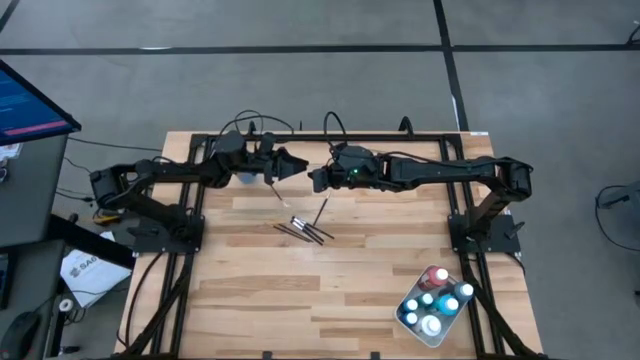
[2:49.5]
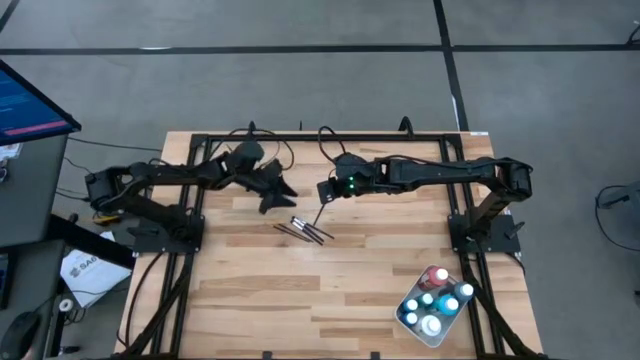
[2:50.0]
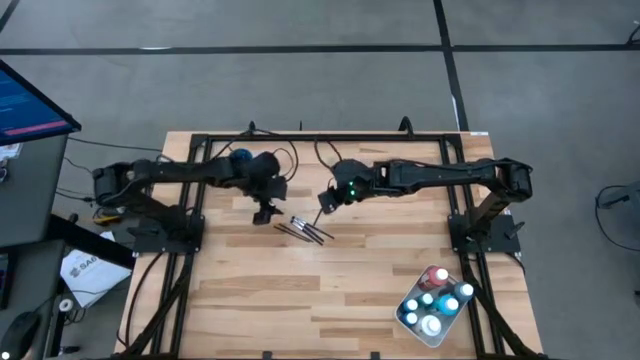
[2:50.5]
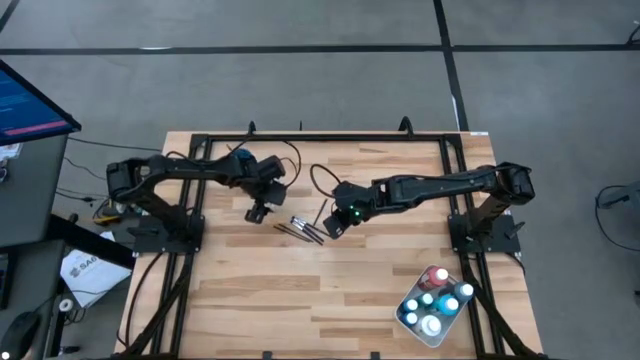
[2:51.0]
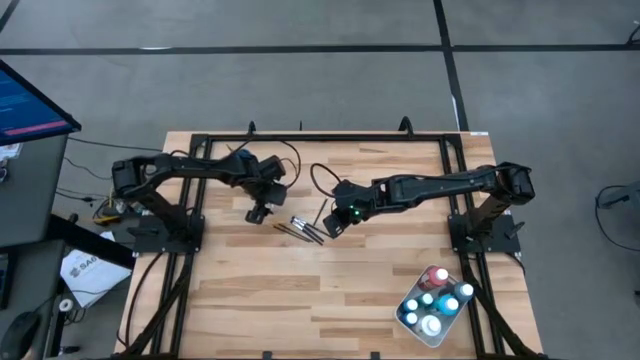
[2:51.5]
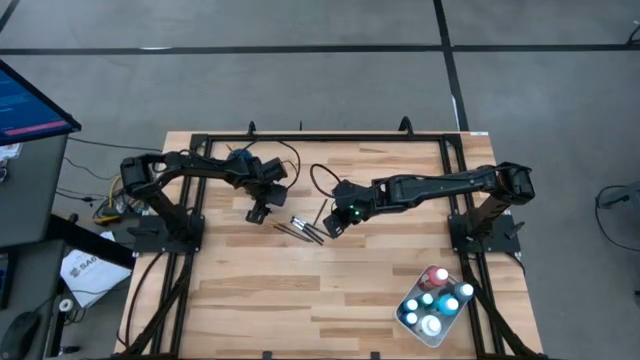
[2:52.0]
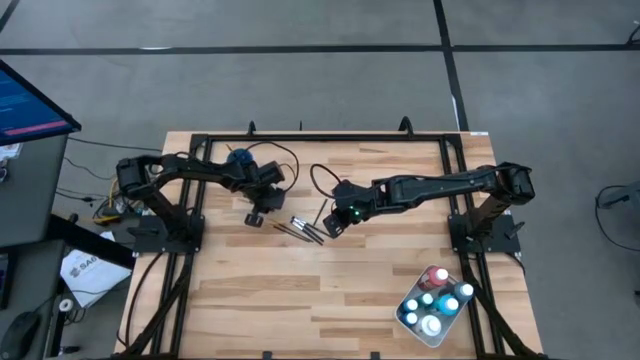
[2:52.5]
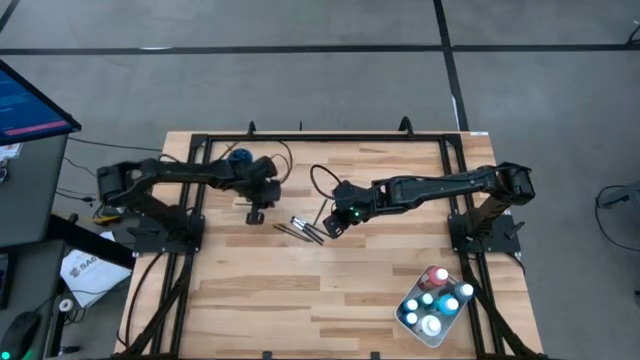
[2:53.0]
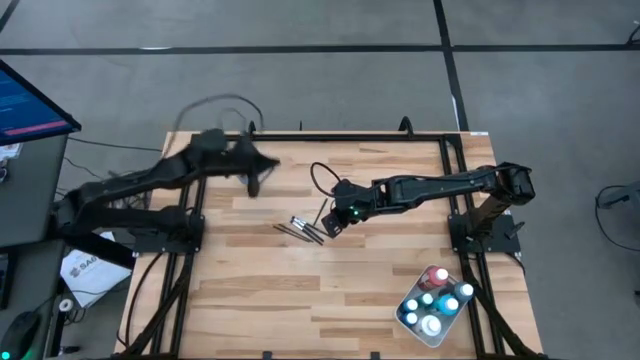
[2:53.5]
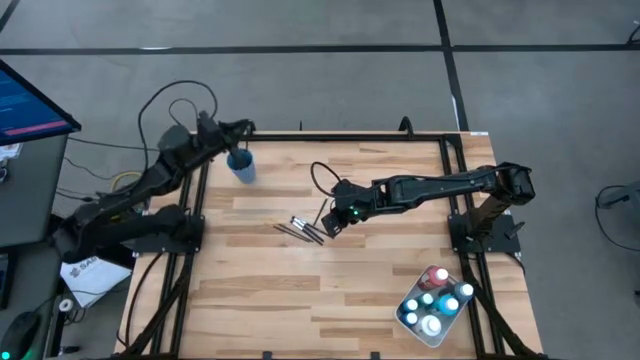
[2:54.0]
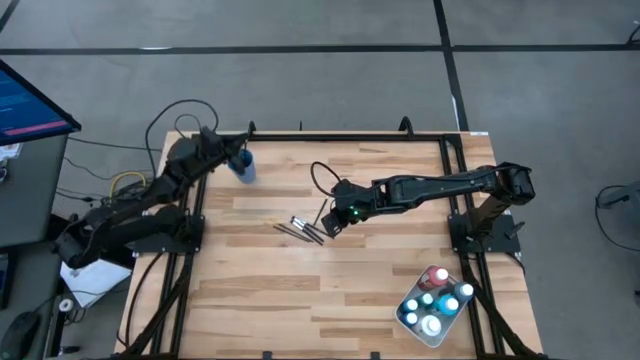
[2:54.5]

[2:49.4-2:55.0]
Task: Pick & Place Paint Supplies
Put the silver paint brush into the blue cup

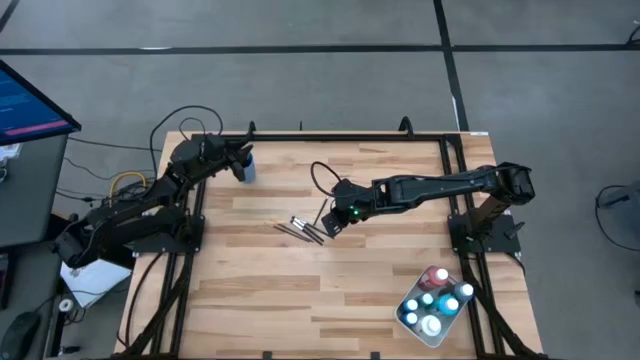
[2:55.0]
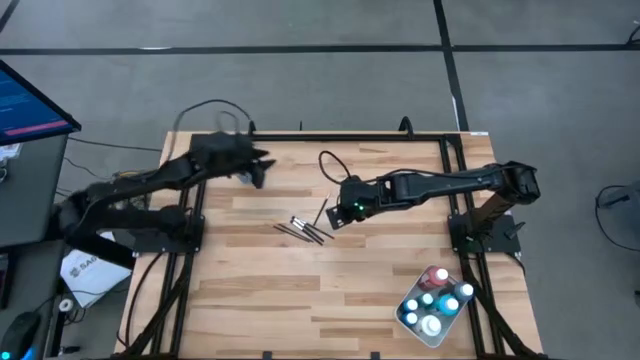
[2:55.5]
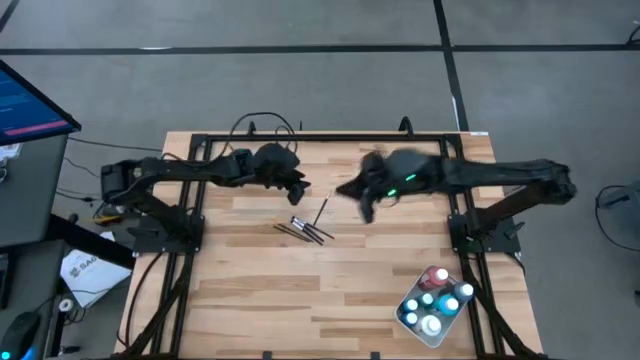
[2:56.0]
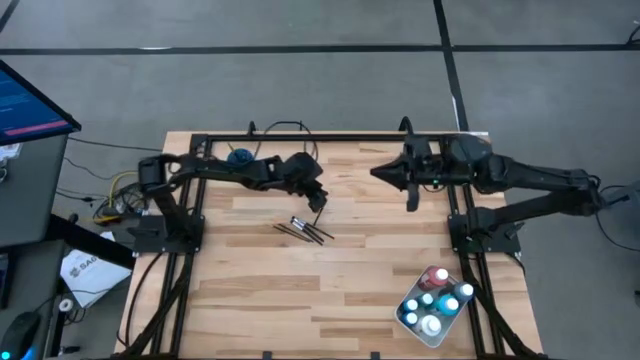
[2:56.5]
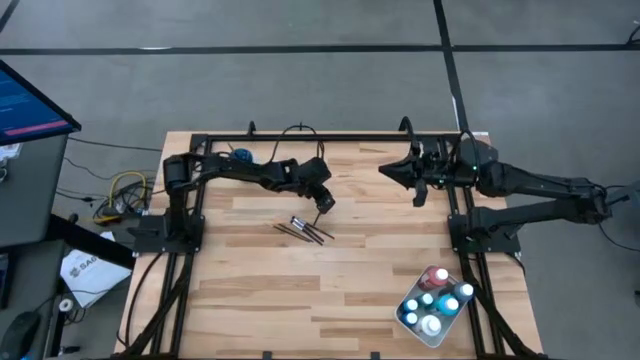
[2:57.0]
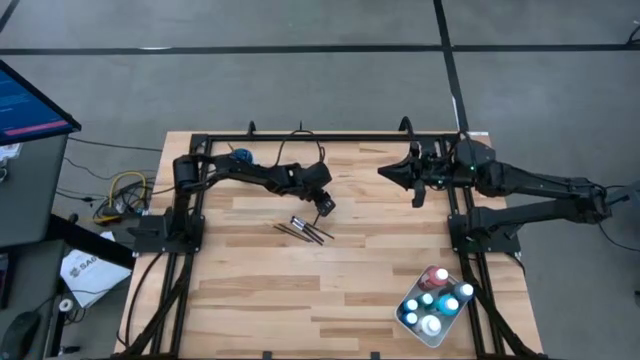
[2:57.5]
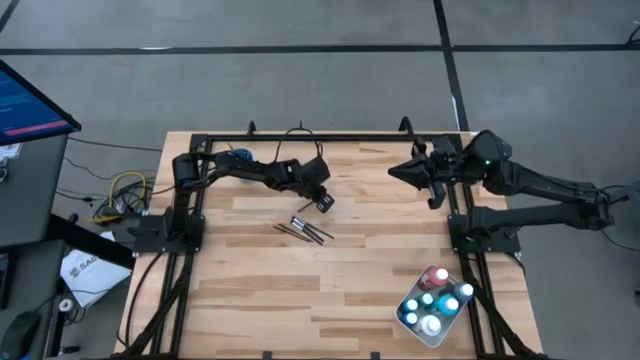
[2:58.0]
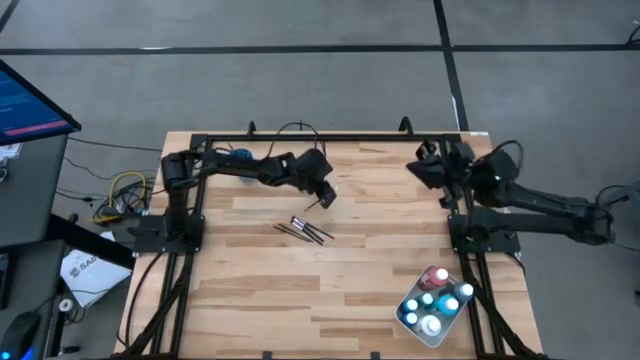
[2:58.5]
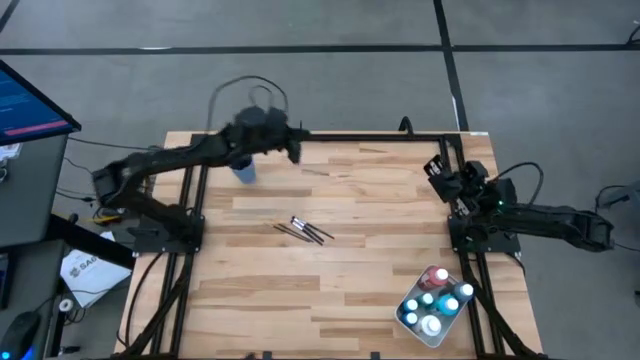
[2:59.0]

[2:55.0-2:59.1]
Put the silver paint brush into the blue cup

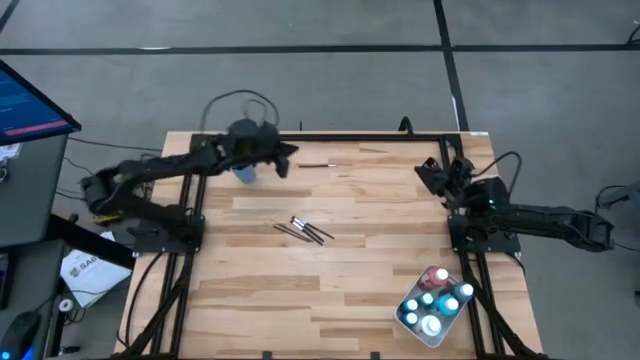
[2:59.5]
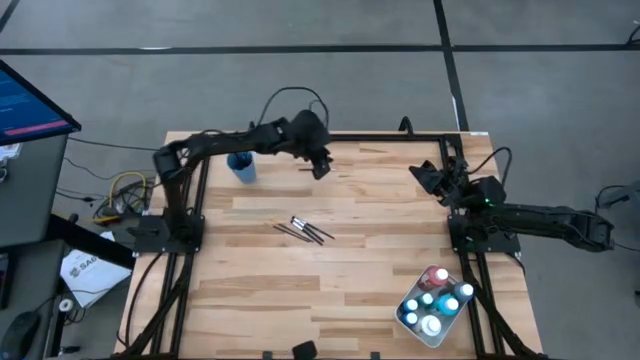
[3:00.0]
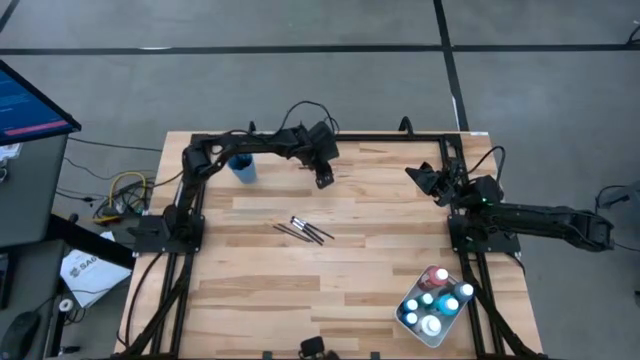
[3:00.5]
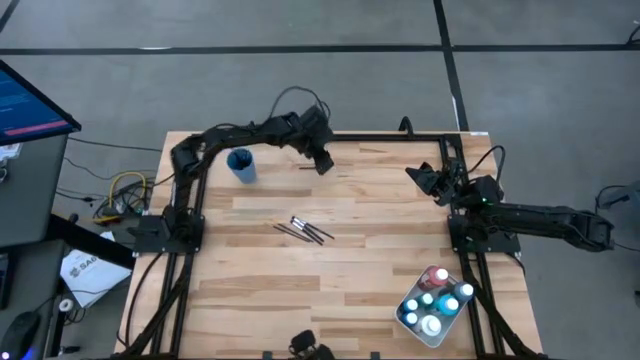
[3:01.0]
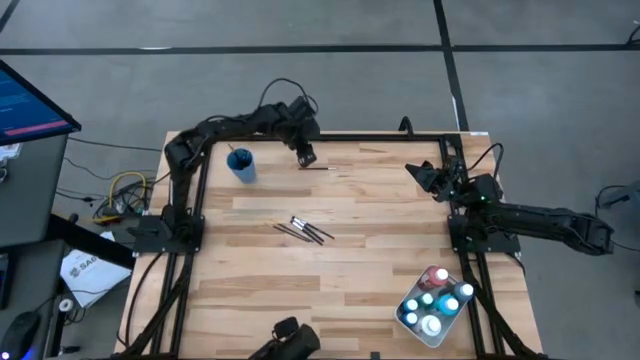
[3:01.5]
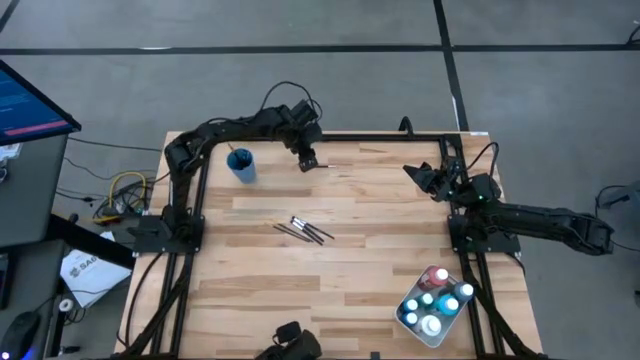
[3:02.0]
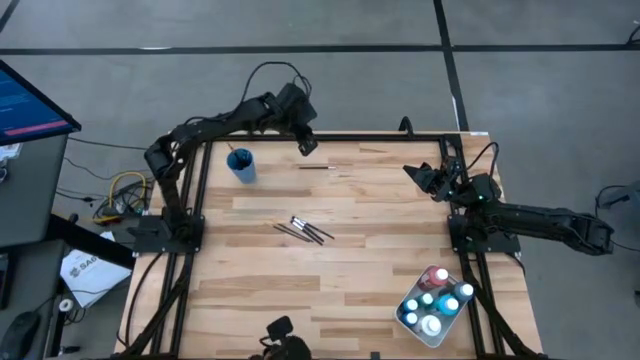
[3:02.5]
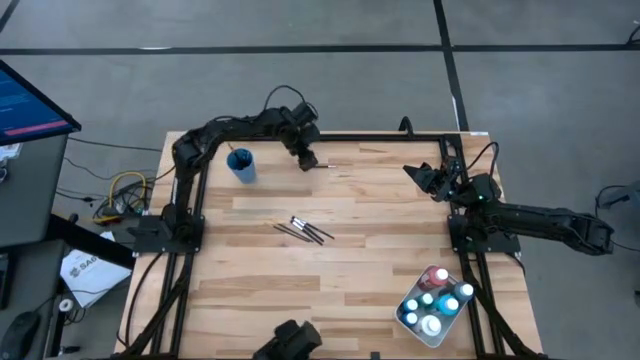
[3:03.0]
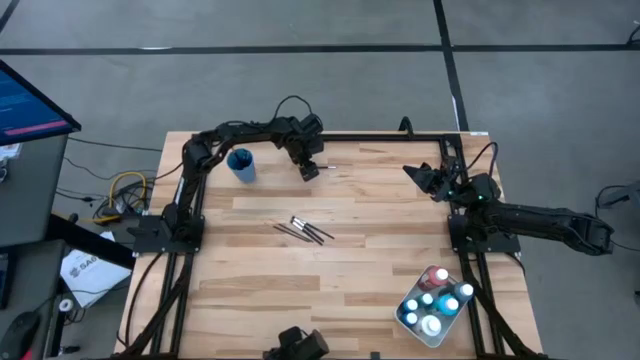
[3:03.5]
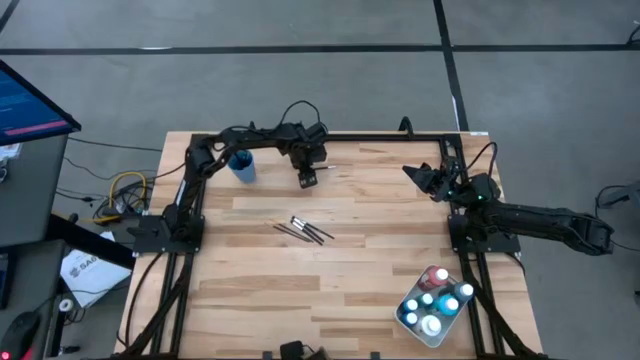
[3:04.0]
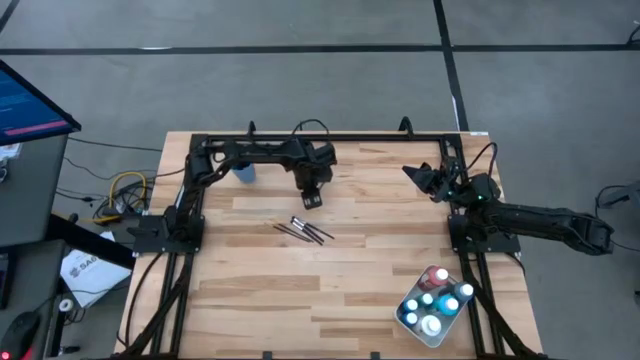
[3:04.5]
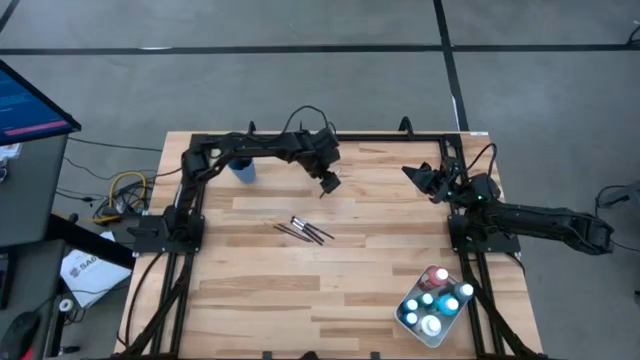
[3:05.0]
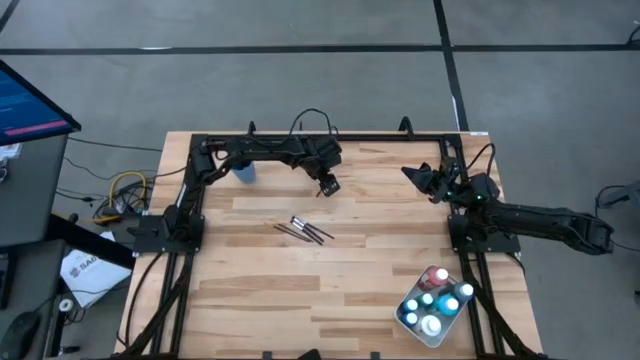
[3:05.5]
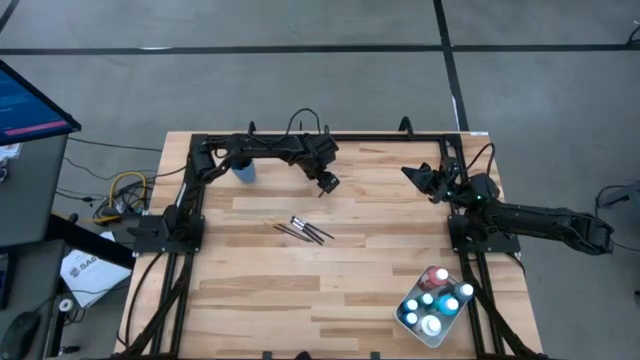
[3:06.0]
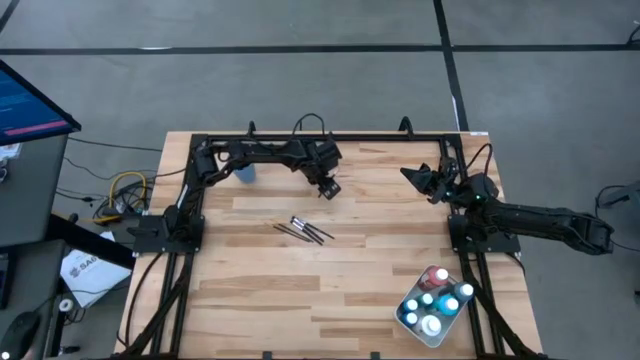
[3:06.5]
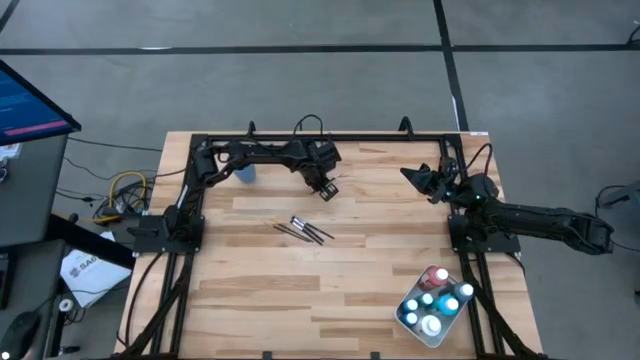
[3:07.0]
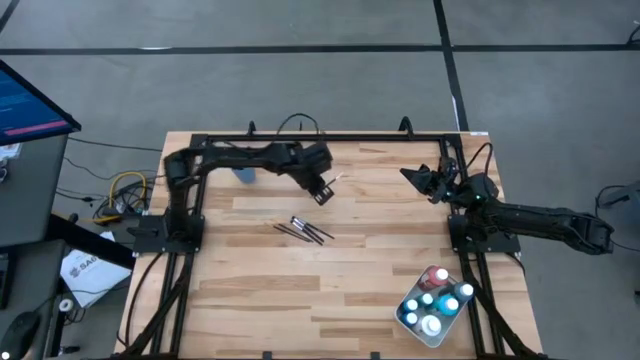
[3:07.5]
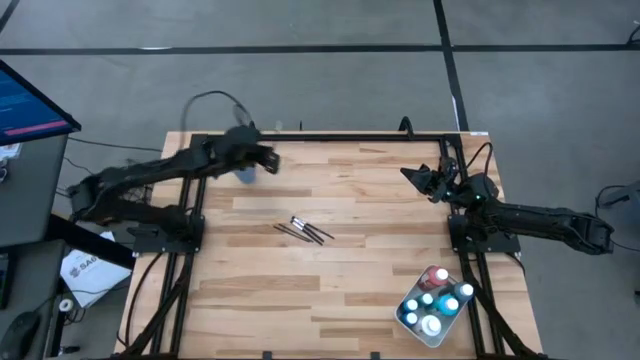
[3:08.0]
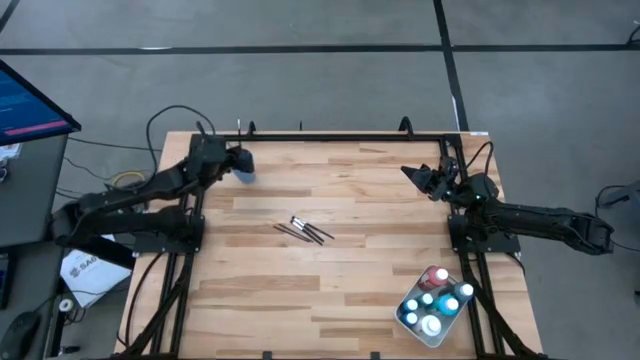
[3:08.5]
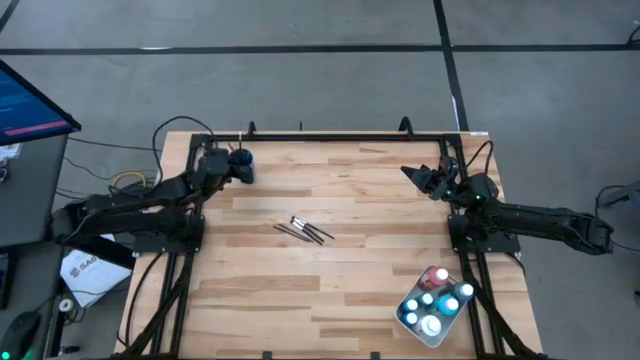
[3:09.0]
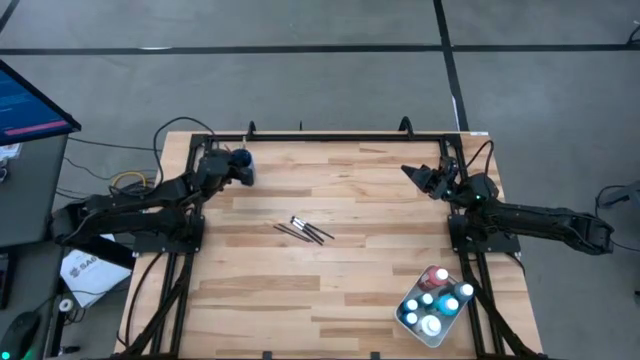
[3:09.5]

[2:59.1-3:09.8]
Put the silver paint brush into the blue cup
